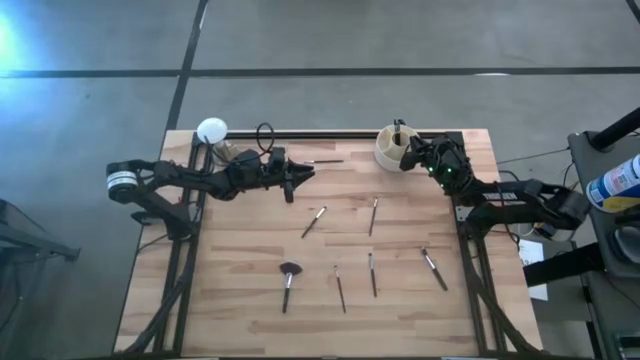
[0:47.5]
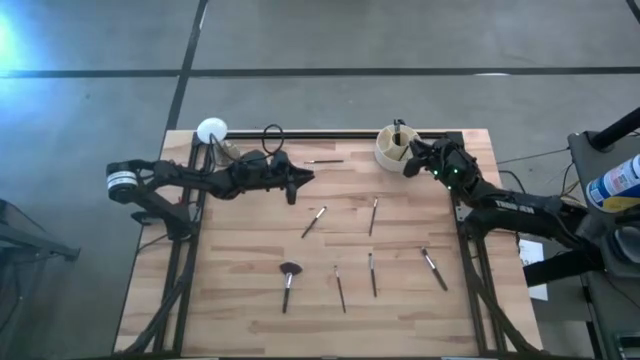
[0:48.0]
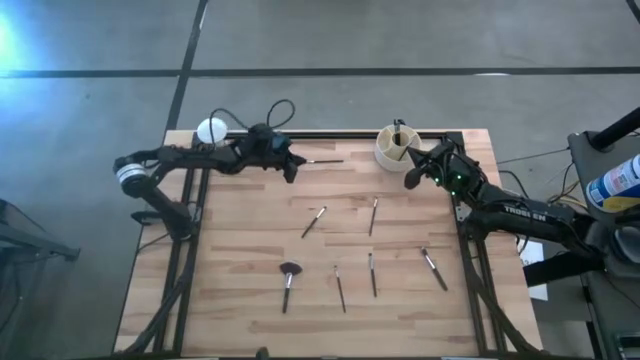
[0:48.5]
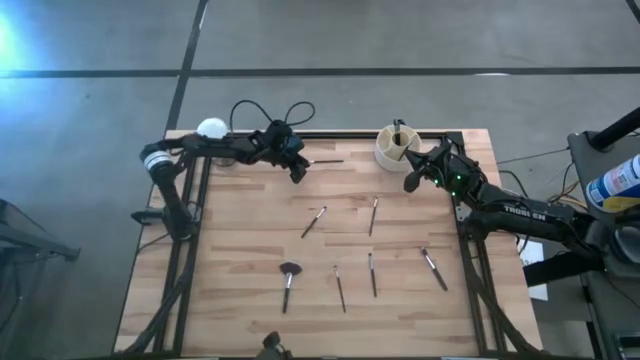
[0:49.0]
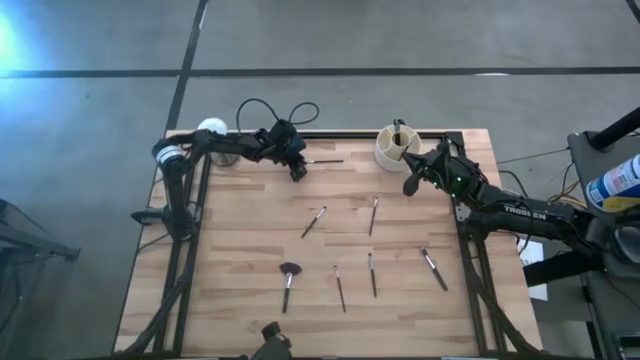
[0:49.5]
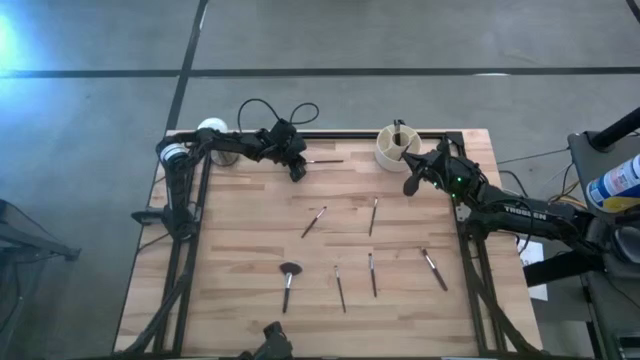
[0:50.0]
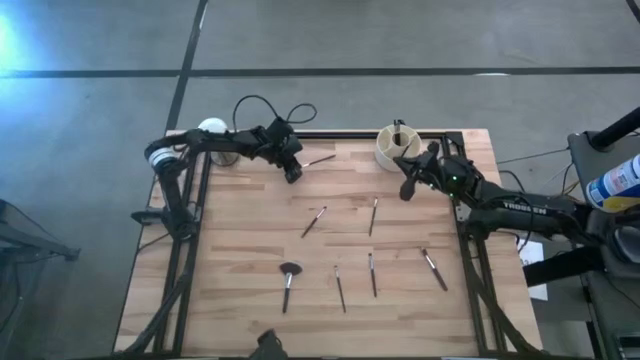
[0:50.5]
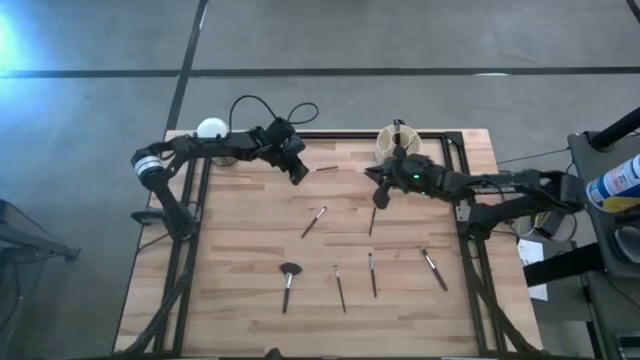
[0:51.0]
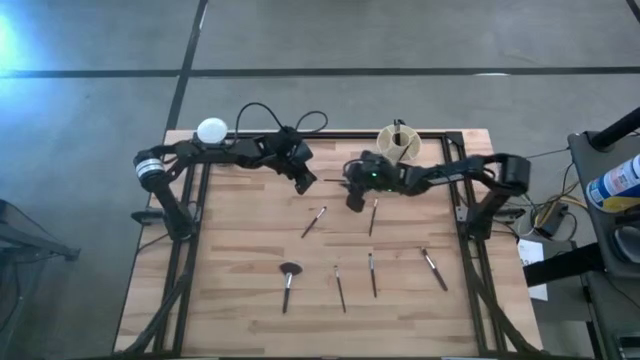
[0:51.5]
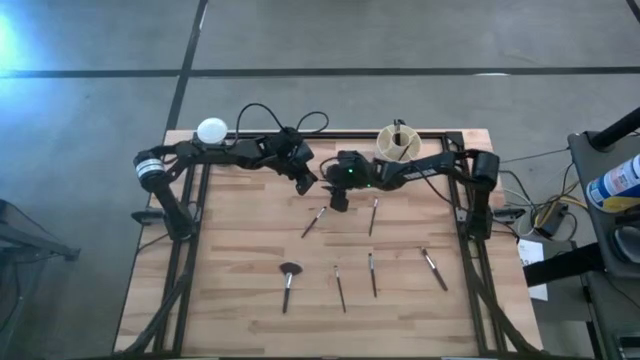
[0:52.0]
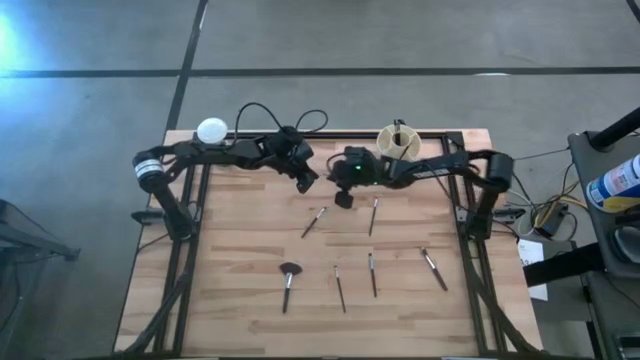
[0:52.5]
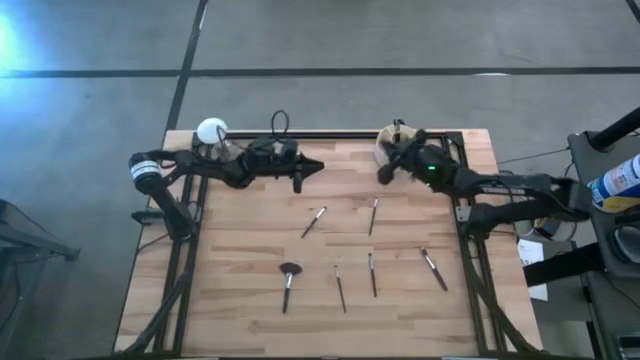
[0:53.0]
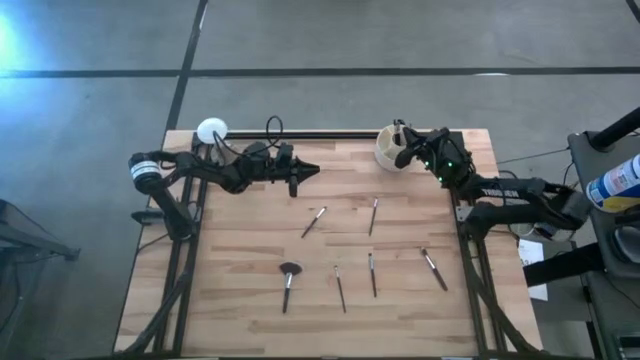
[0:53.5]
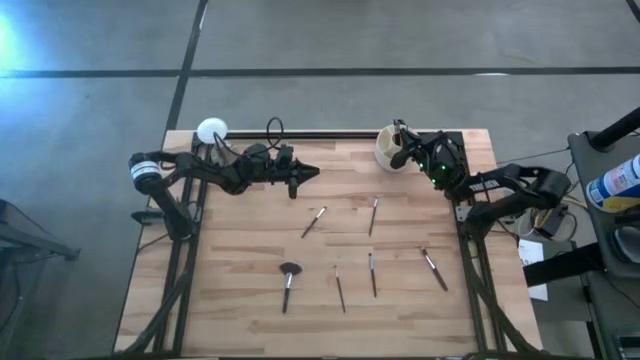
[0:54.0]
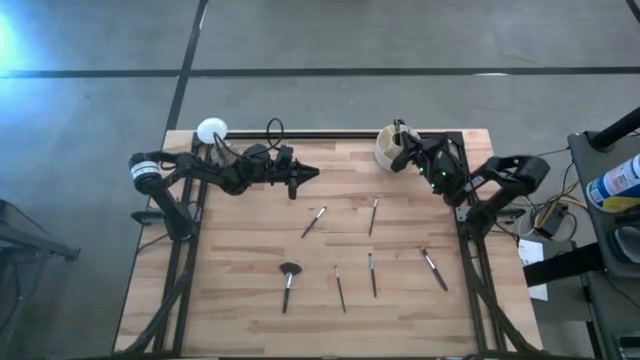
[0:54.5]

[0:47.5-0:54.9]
Task: Put items in baskets/containers
Put the black eyeshadow brush into the white pen organizer

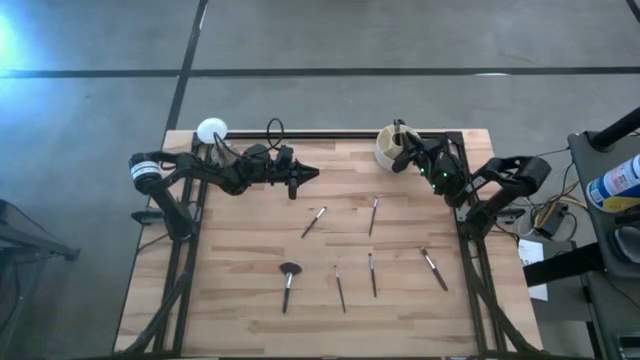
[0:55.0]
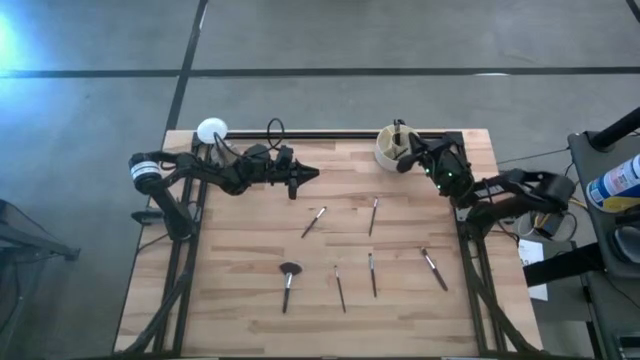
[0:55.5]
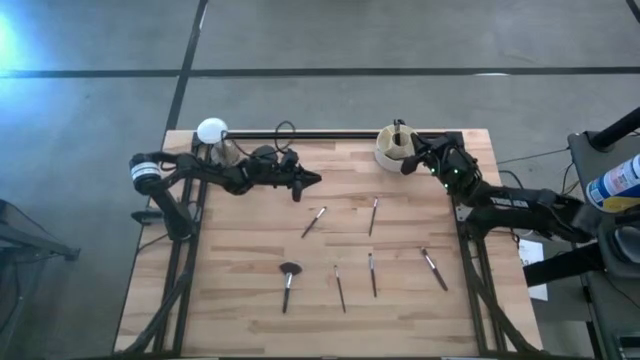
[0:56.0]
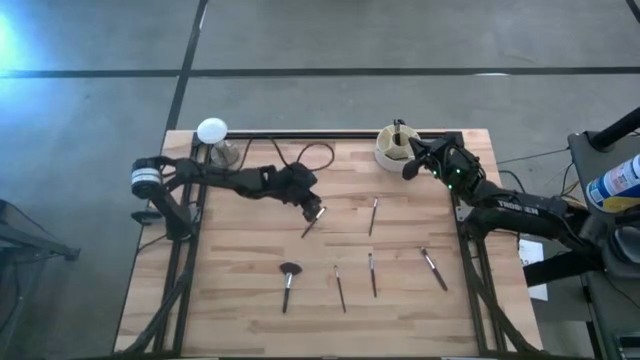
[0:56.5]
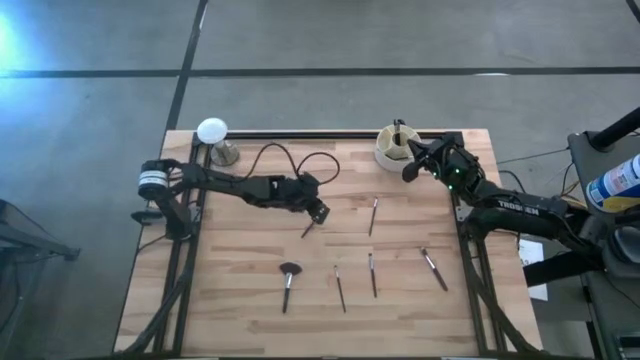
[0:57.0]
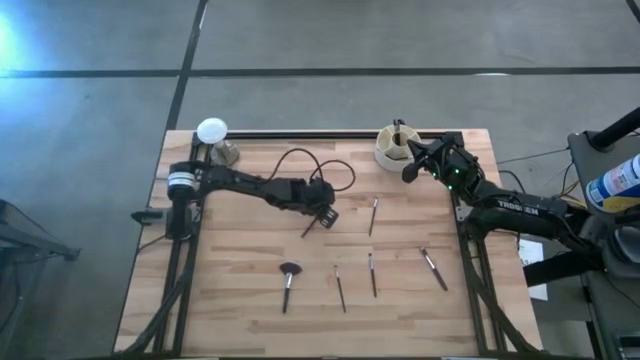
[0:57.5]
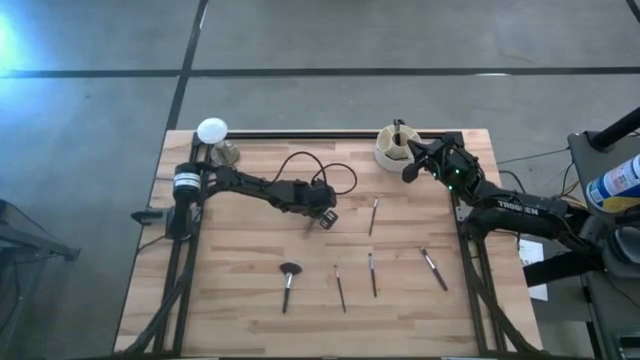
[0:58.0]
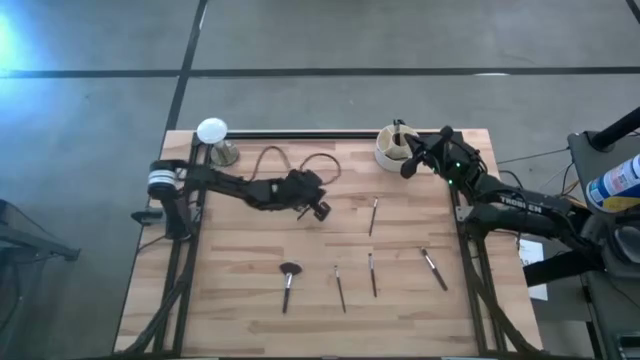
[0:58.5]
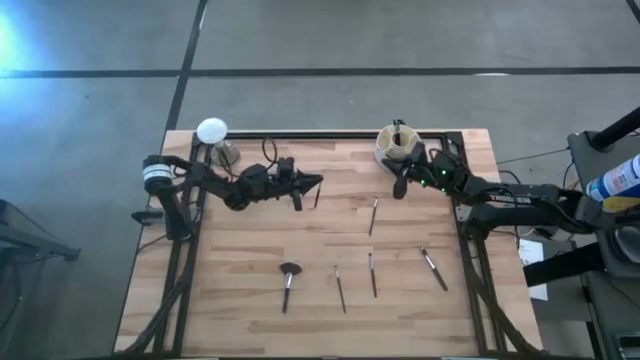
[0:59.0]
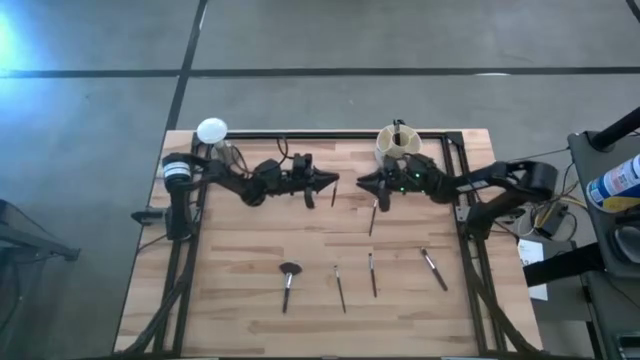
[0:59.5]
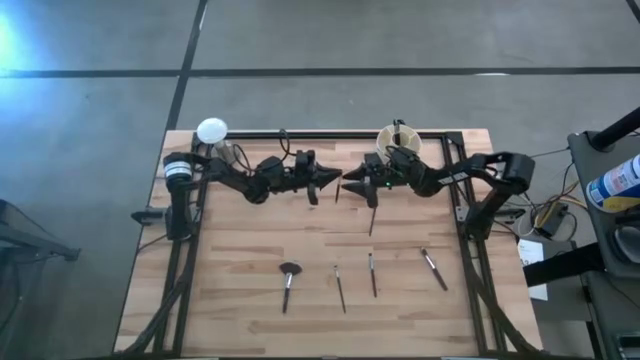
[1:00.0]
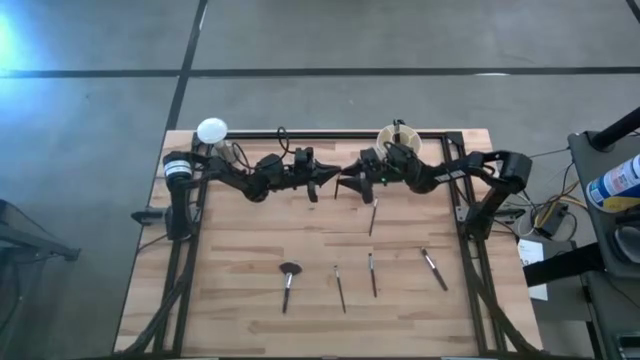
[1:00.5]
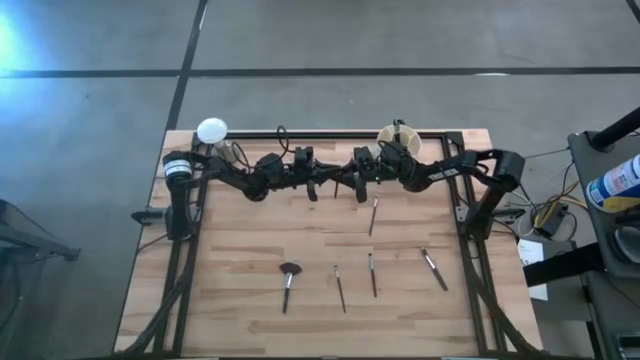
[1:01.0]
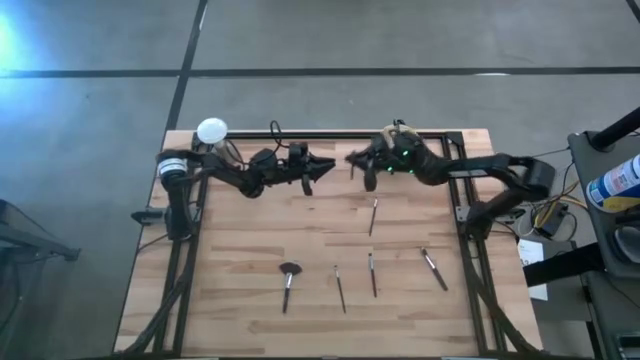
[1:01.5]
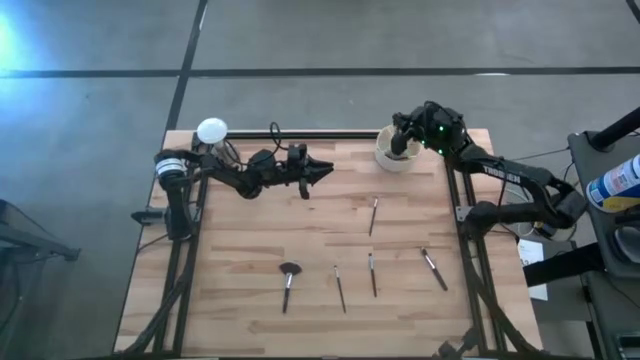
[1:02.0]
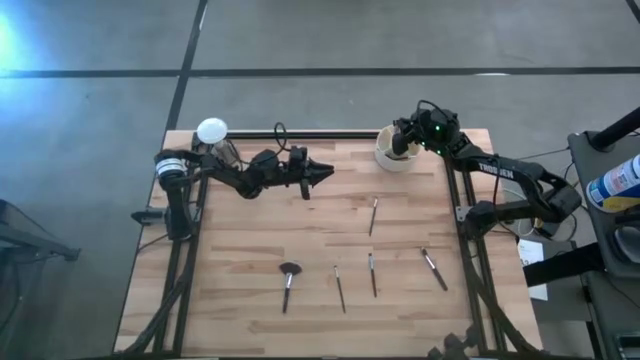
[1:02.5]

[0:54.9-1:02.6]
Put the black eyeshadow brush into the white pen organizer

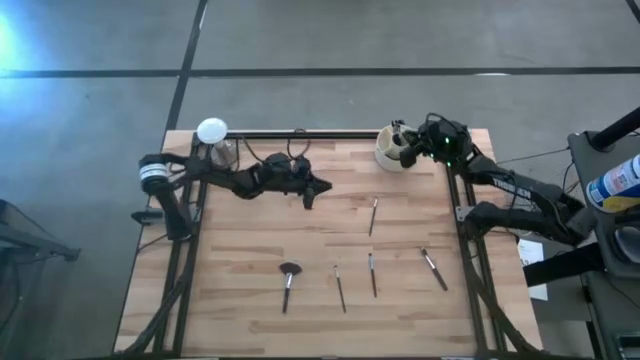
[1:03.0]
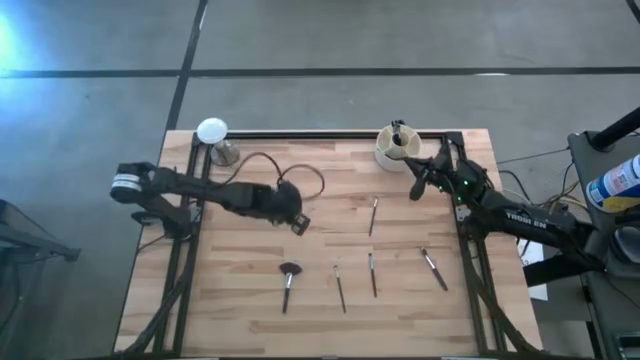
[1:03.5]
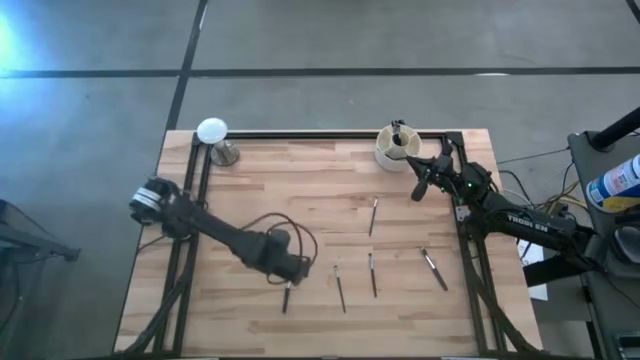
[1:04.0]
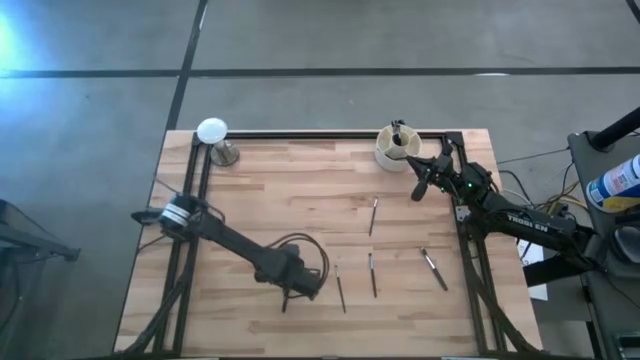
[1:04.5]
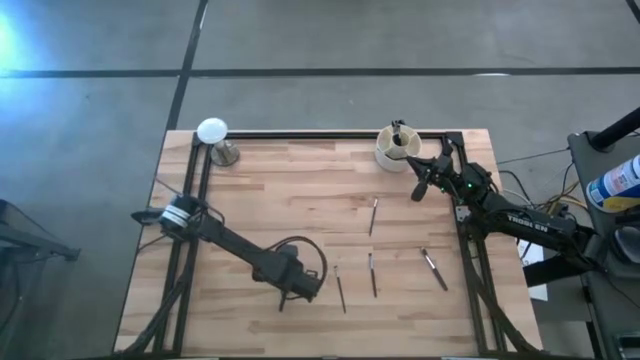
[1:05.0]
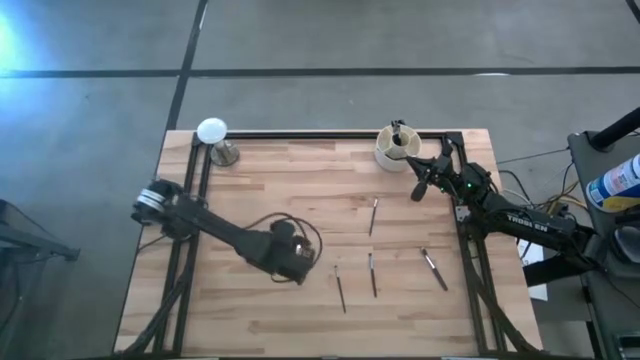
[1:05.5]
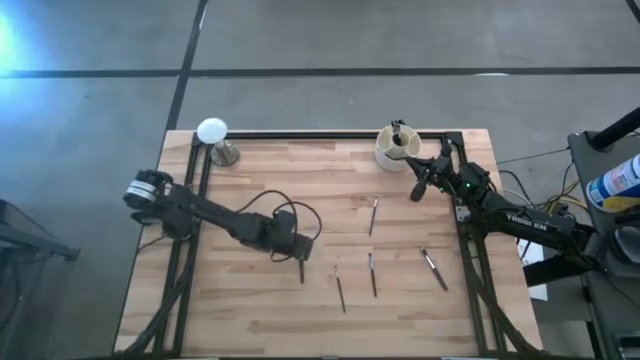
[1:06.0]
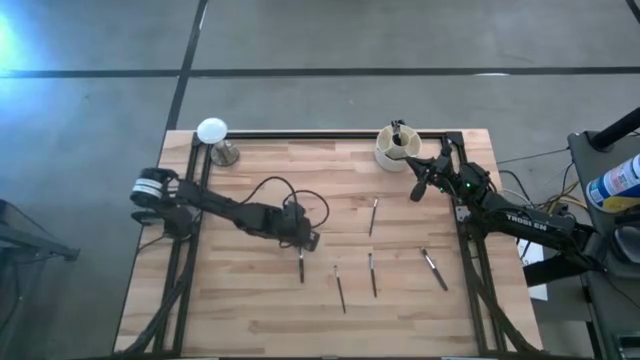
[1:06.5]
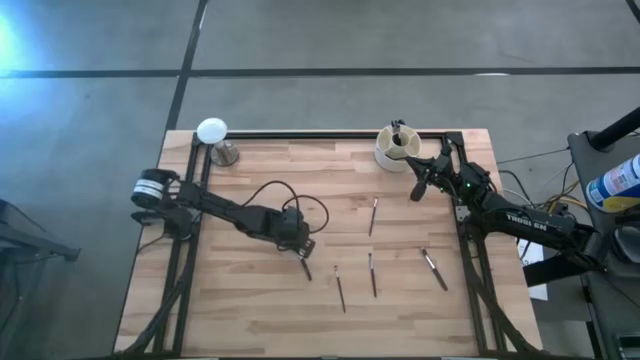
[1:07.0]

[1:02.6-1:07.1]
Put the black highlighter brush into the white pen organizer

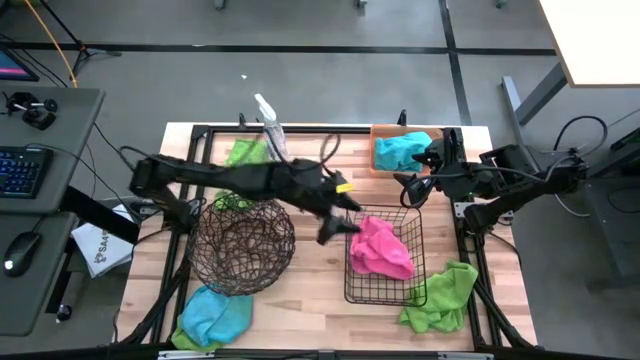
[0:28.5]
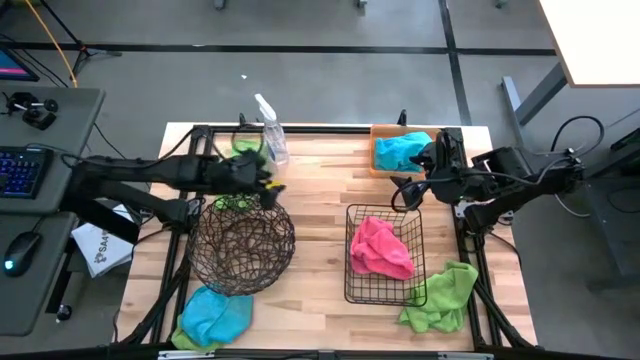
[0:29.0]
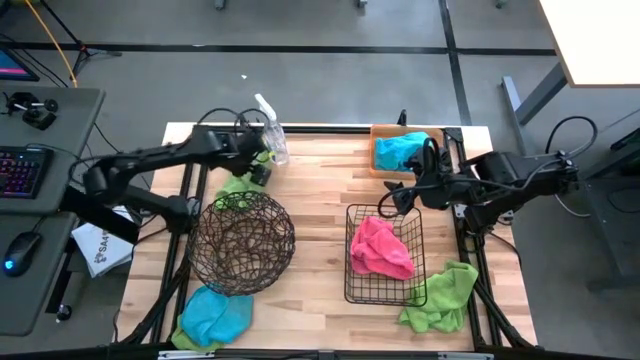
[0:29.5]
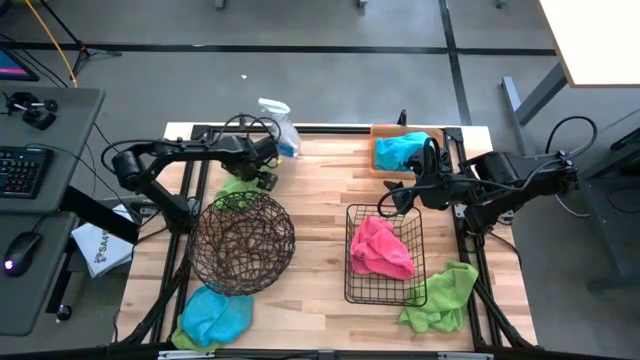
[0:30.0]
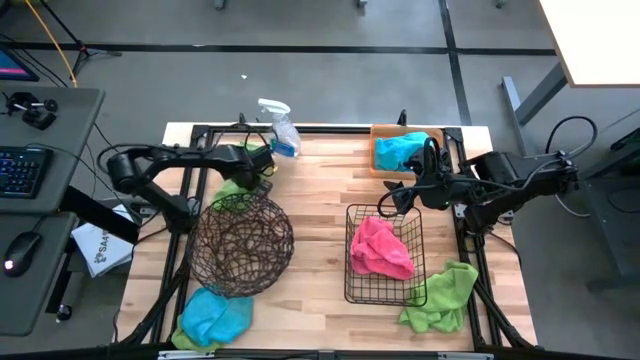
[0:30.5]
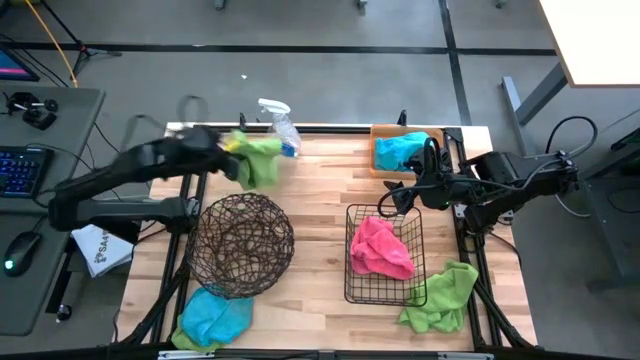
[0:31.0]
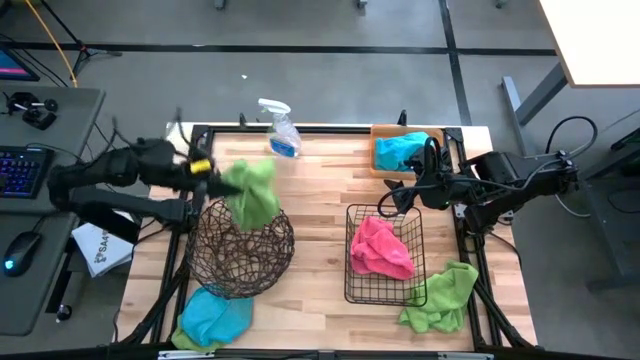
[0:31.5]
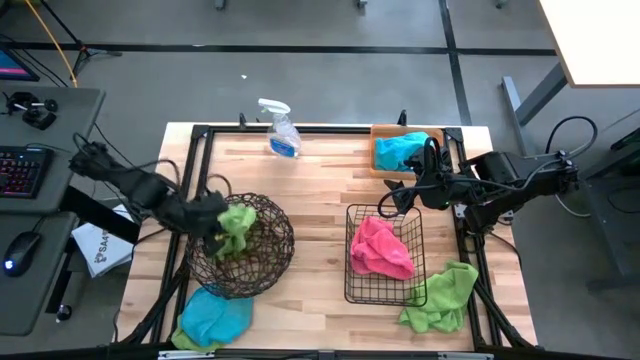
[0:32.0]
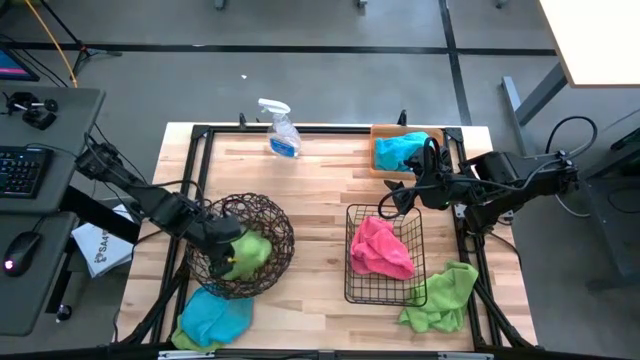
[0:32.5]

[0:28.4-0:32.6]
Task: Sort microfiber towel by color & place in baskets
Put the top green towel into the round wire basket
